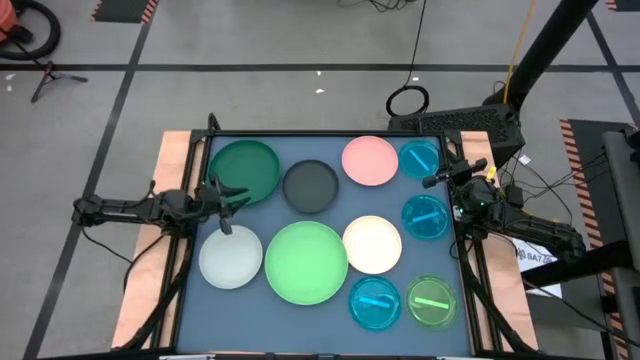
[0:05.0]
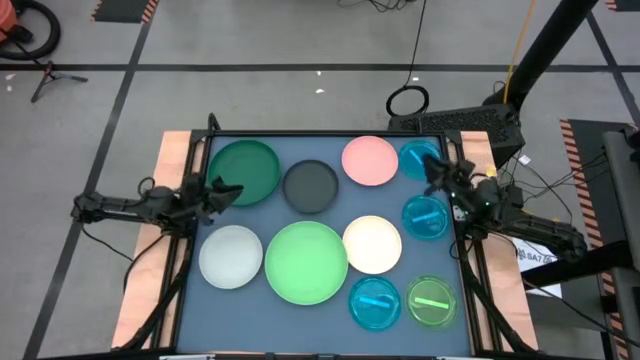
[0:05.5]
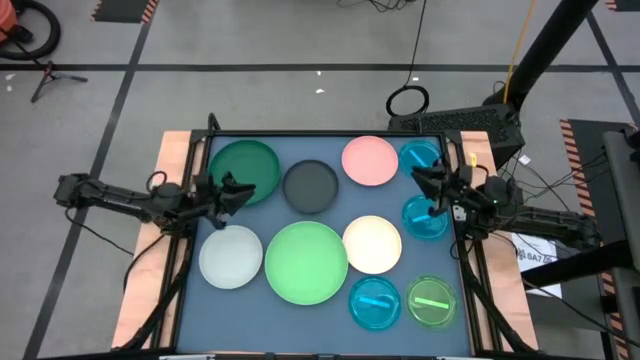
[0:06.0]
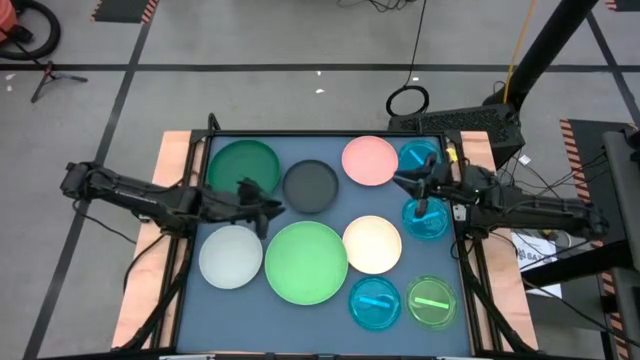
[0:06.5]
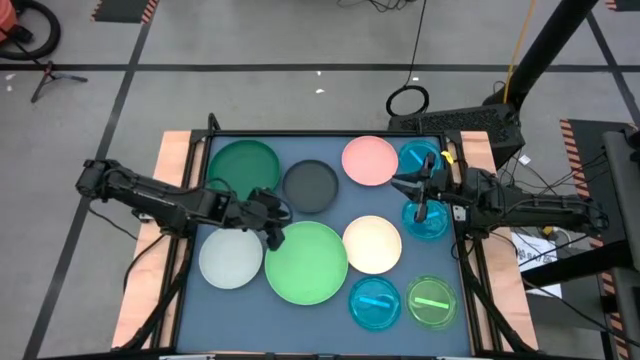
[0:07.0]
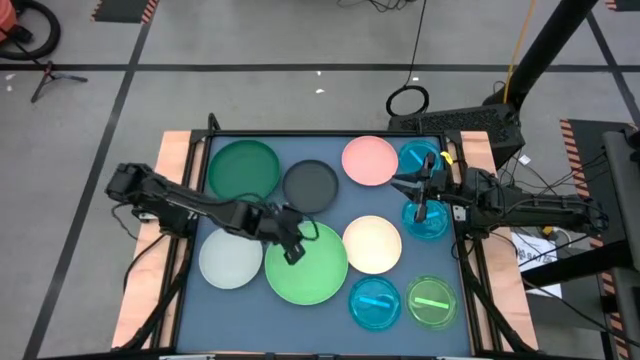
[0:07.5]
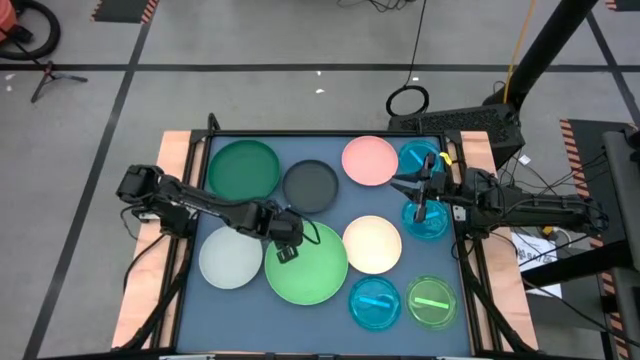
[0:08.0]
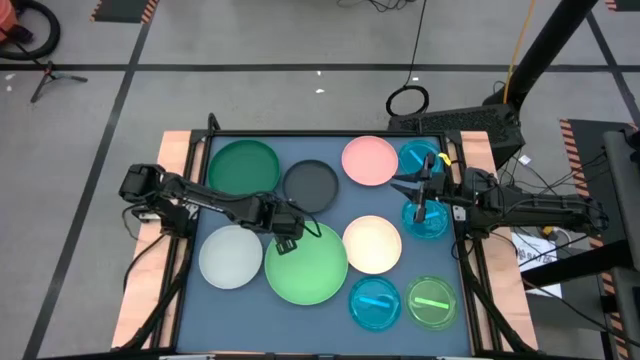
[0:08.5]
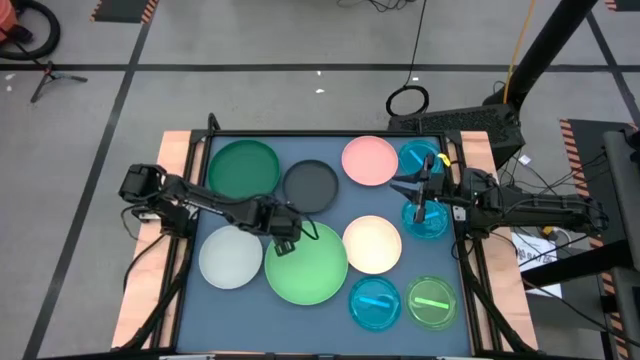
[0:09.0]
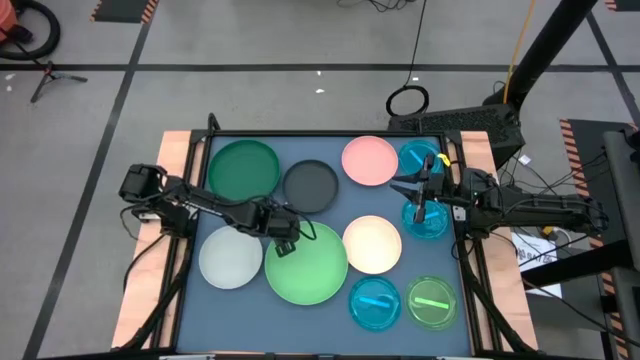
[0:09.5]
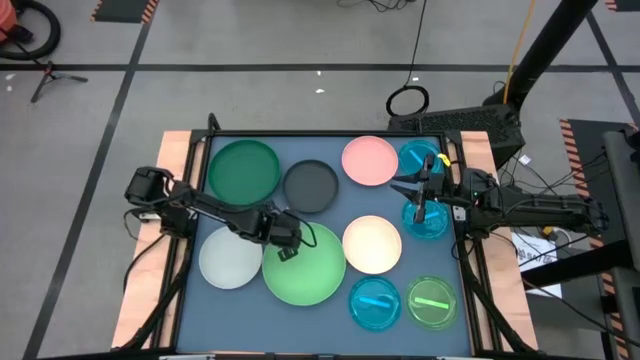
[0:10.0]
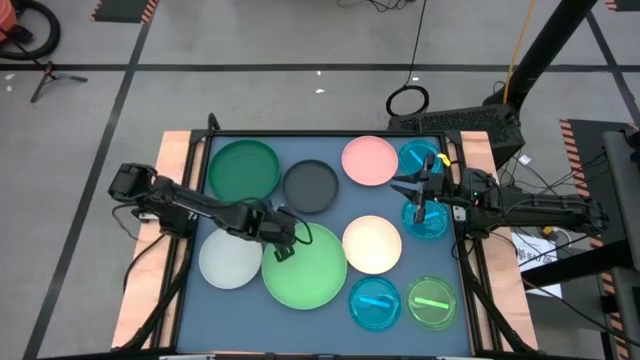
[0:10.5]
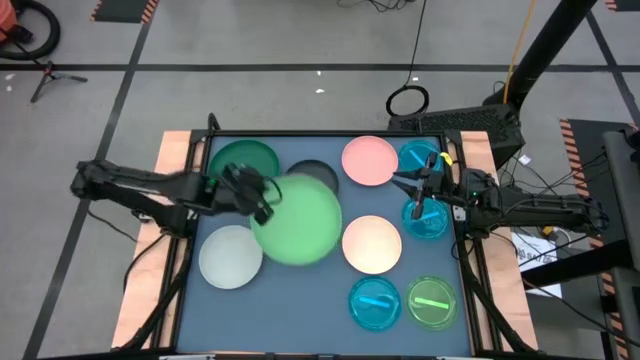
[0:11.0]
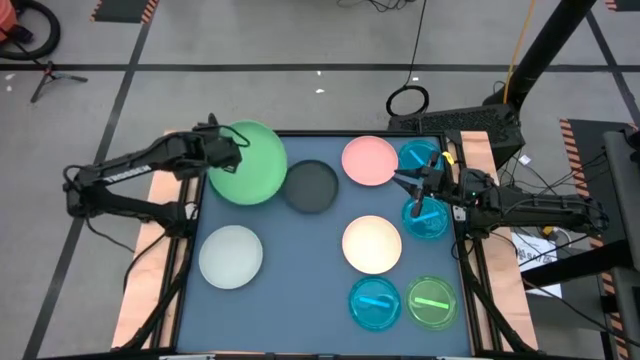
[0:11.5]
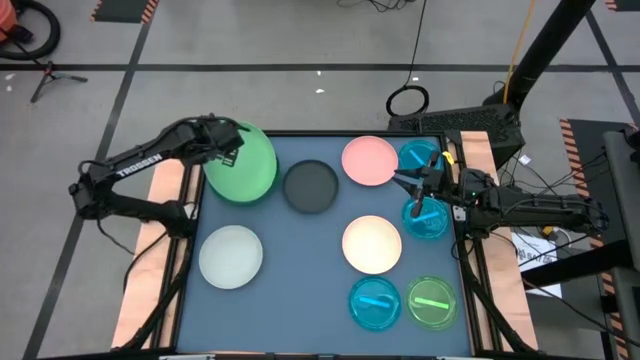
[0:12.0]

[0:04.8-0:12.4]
Task: Stack plastic plates
Stack the light green plate on top of the dark green plate

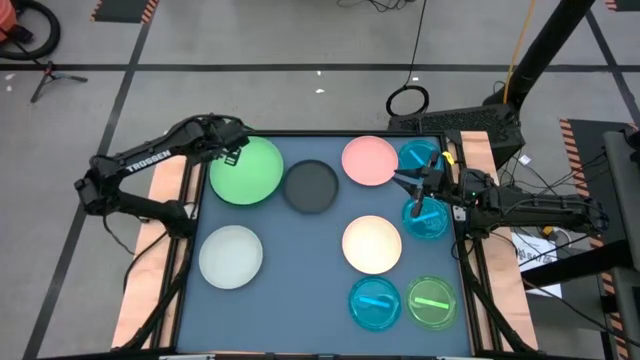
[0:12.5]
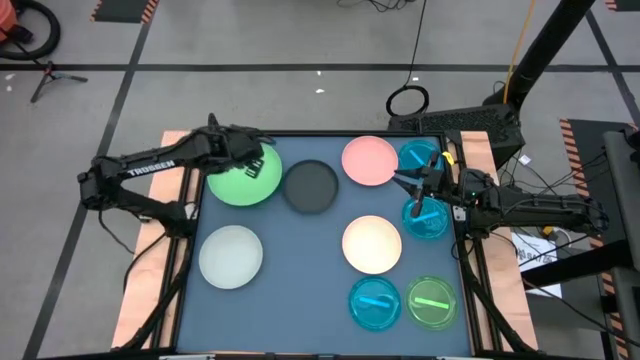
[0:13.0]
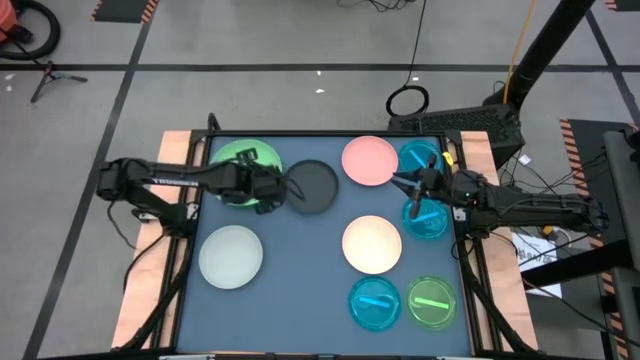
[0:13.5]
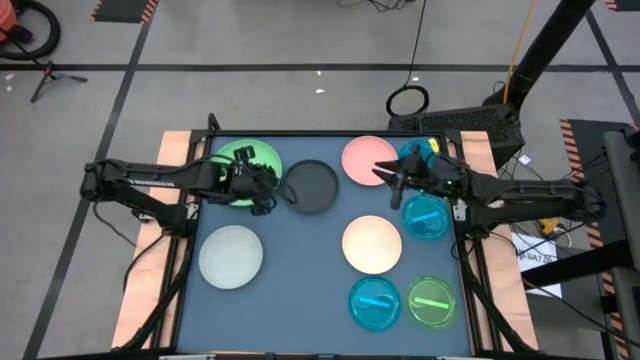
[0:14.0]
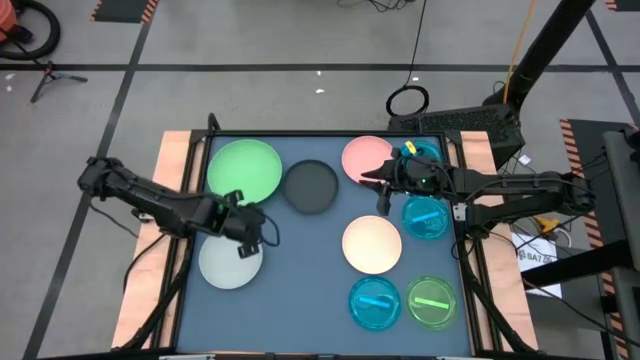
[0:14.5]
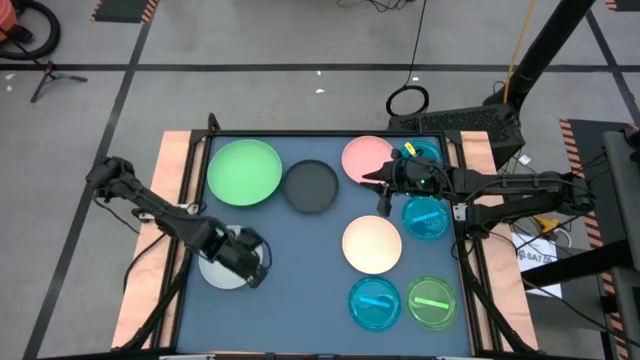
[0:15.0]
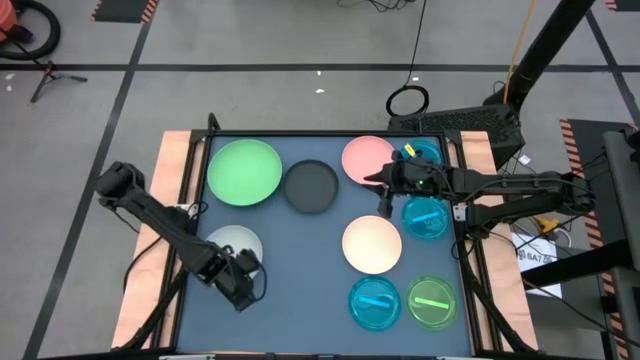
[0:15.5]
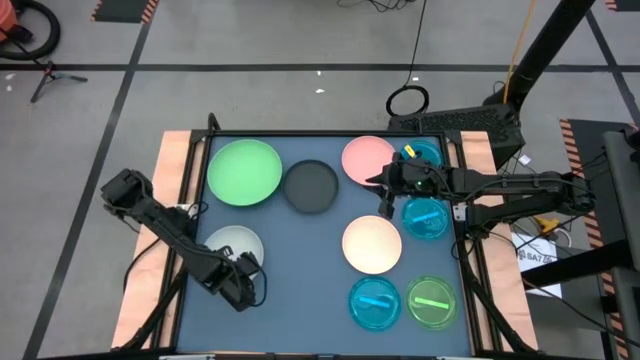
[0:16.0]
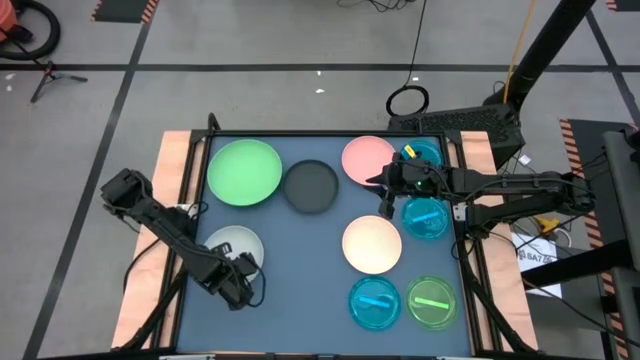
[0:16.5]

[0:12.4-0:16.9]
Stack the white plate on top of the light green plate

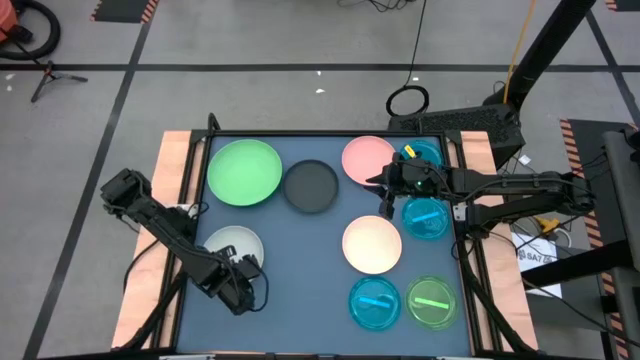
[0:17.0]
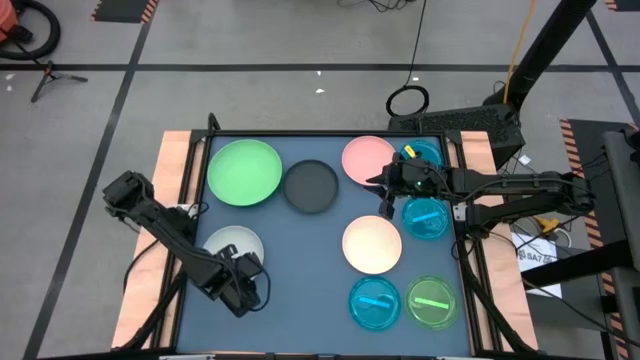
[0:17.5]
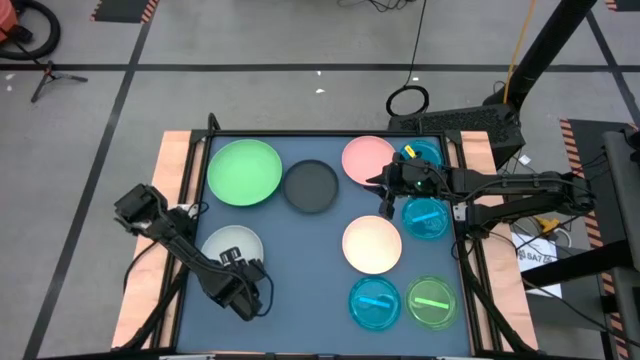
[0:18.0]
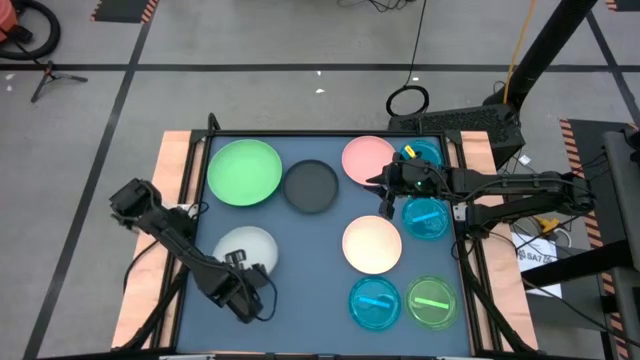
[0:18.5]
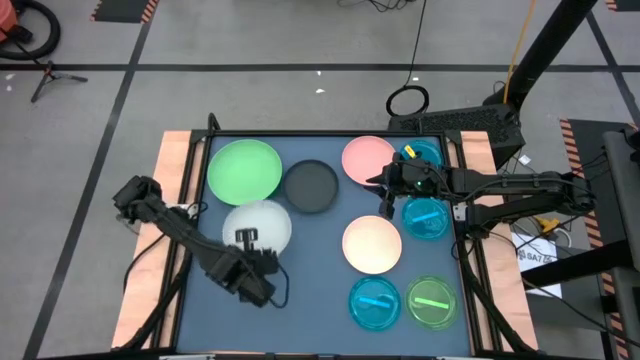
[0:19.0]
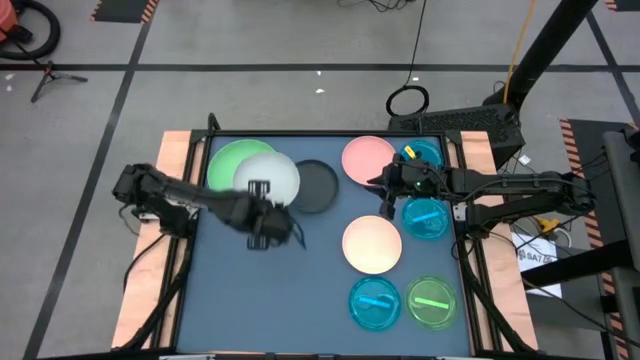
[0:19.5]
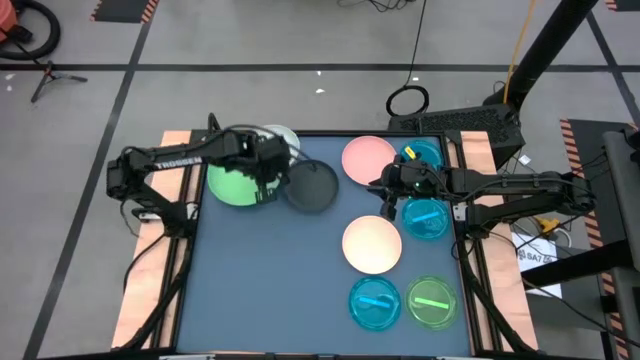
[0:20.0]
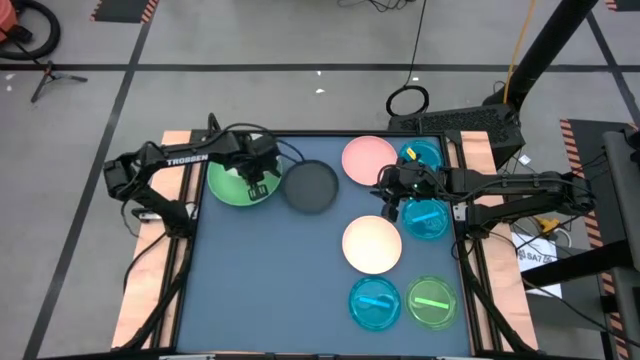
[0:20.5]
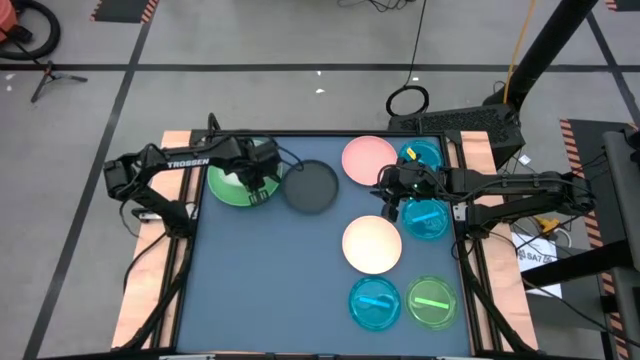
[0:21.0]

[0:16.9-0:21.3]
Stack the white plate on top of the light green plate

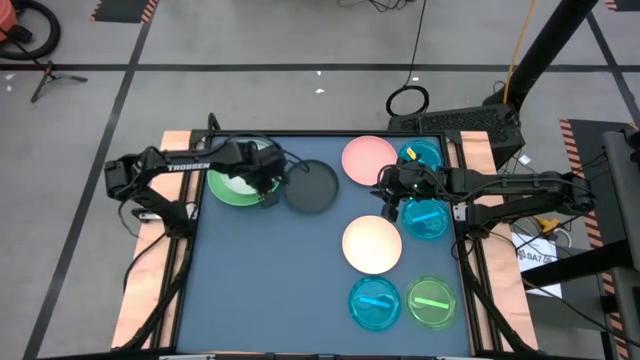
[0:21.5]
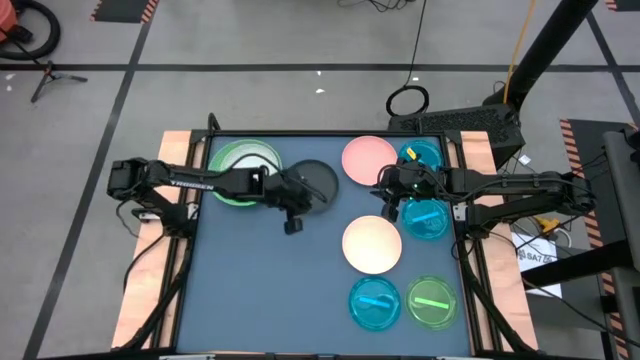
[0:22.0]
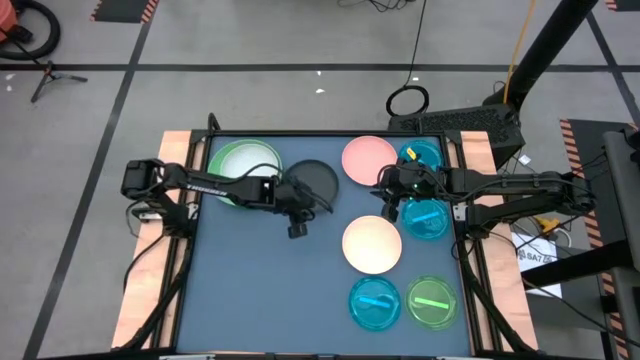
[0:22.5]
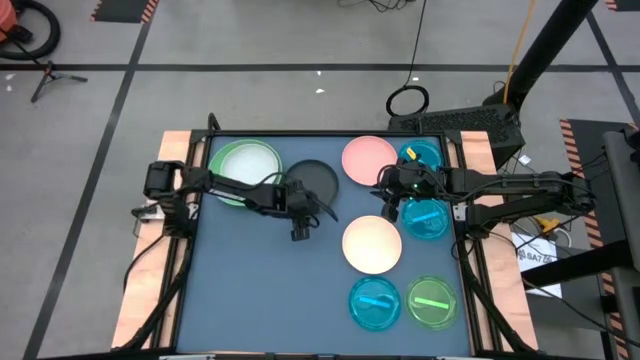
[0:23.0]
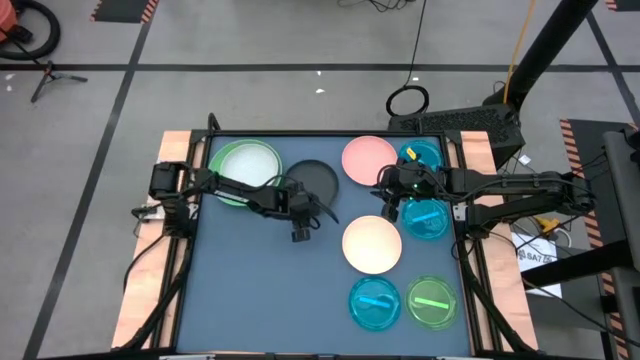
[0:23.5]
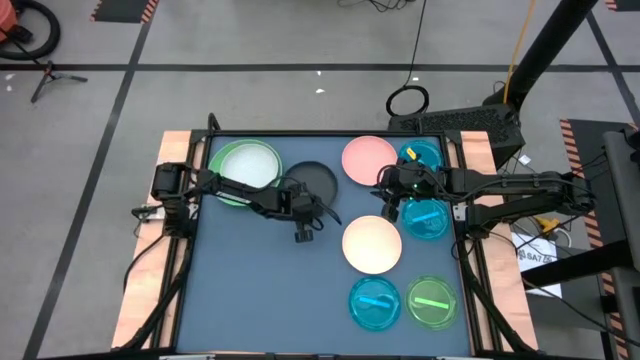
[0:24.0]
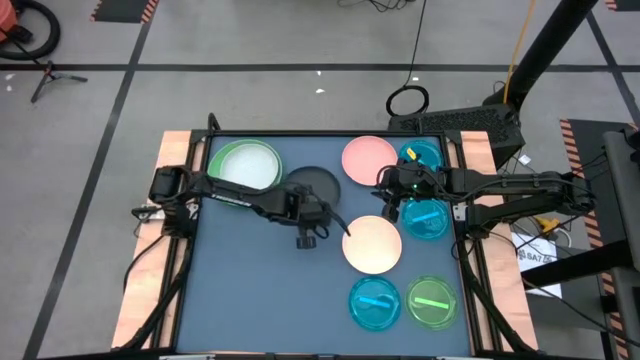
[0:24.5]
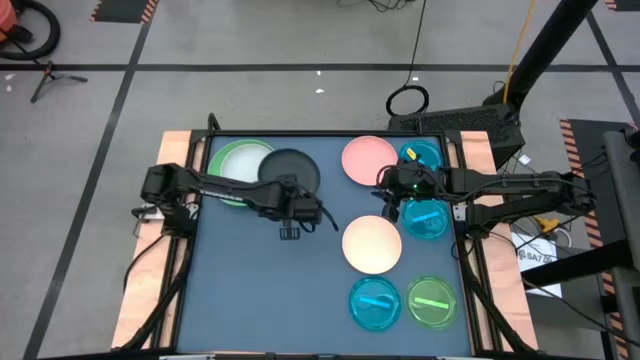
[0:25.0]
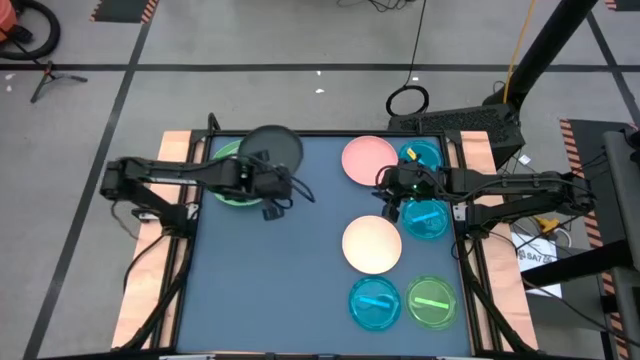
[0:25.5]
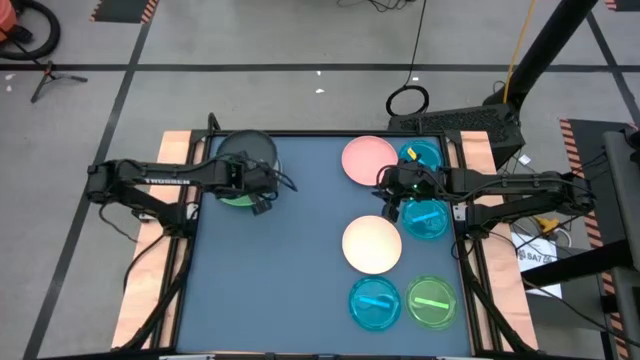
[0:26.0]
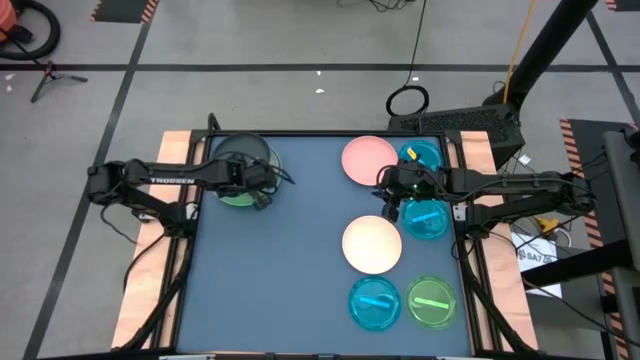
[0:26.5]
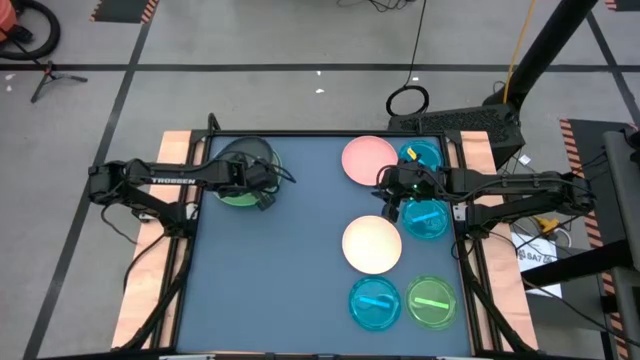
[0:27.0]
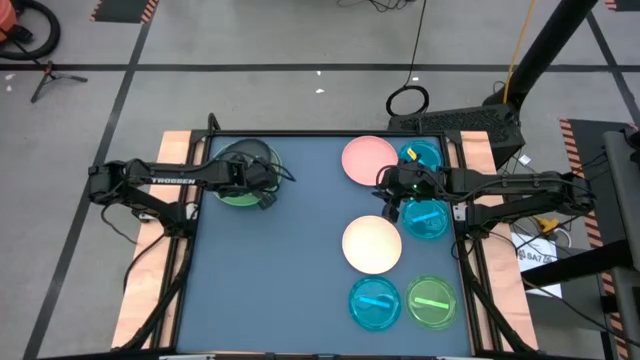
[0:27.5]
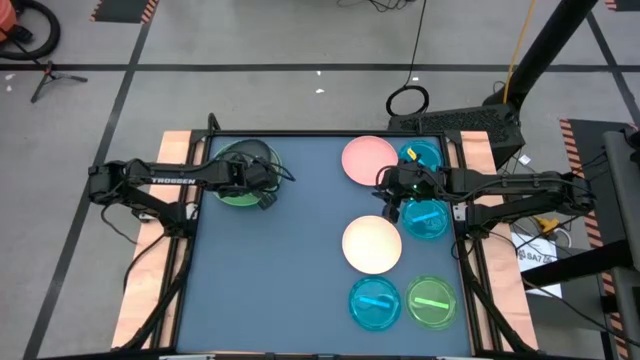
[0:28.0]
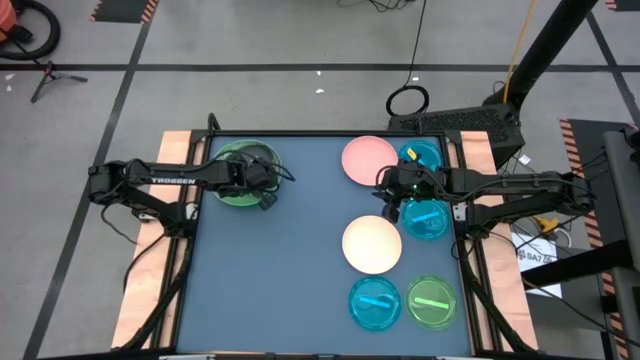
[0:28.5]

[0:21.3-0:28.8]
Stack the black plate on top of the white plate
